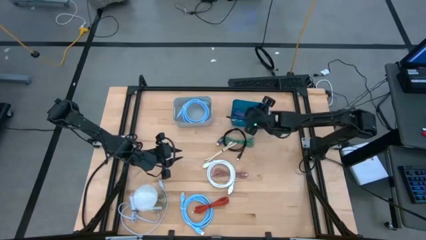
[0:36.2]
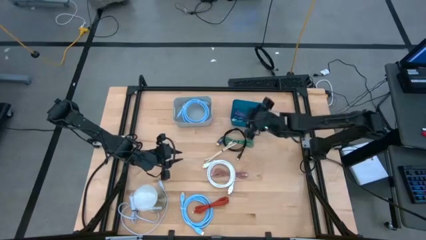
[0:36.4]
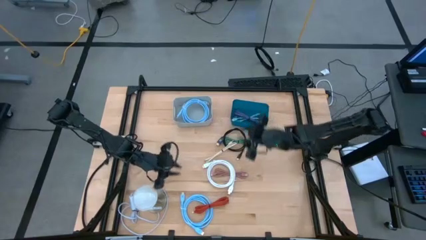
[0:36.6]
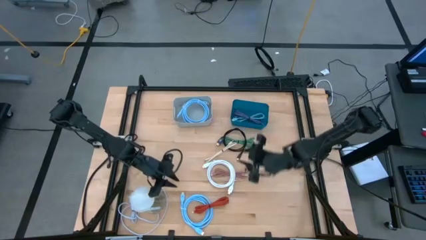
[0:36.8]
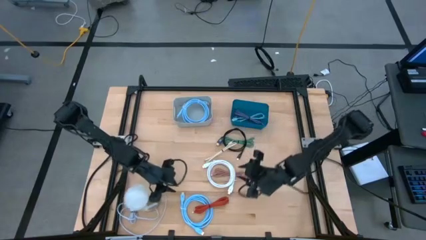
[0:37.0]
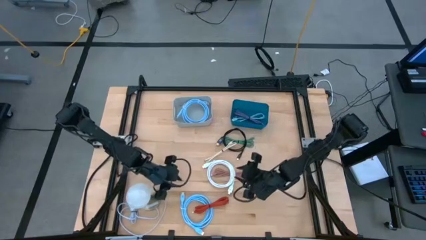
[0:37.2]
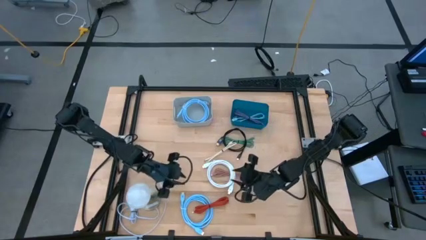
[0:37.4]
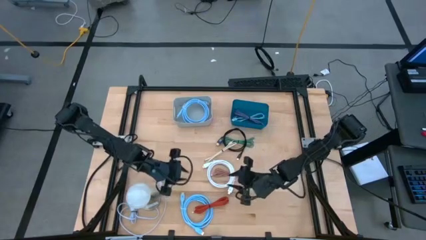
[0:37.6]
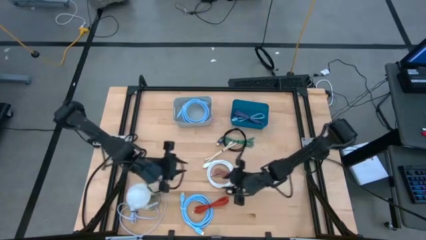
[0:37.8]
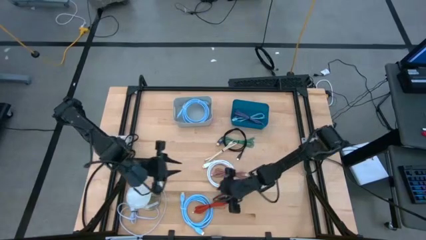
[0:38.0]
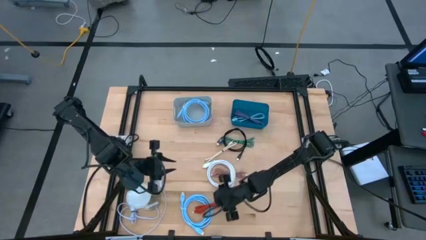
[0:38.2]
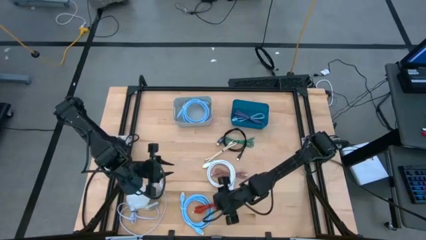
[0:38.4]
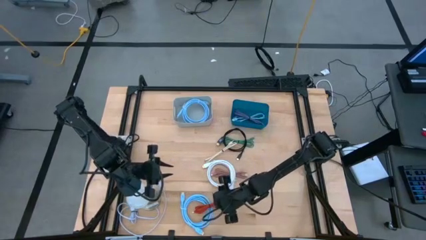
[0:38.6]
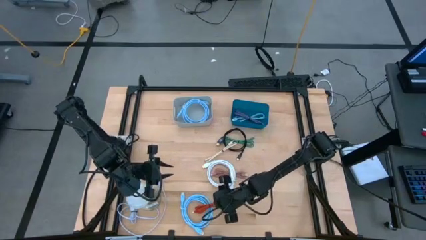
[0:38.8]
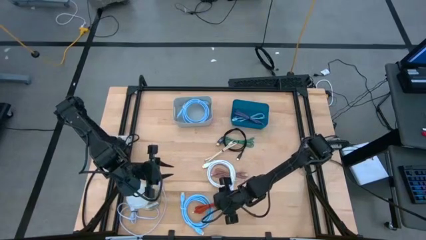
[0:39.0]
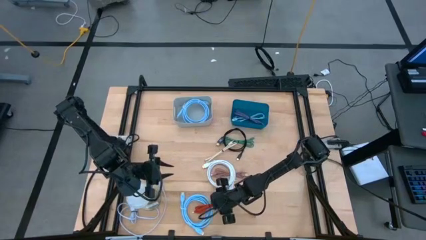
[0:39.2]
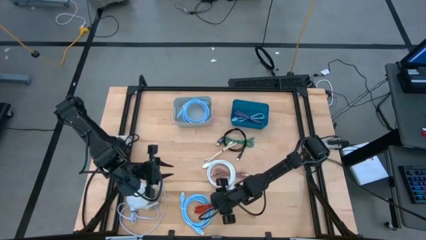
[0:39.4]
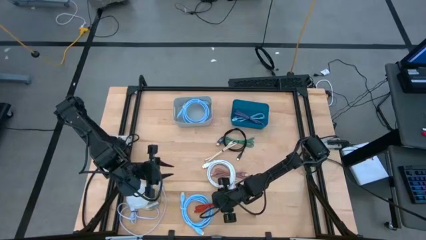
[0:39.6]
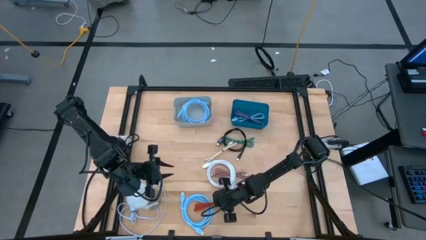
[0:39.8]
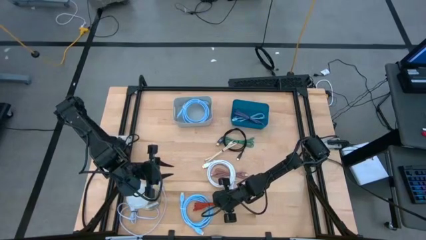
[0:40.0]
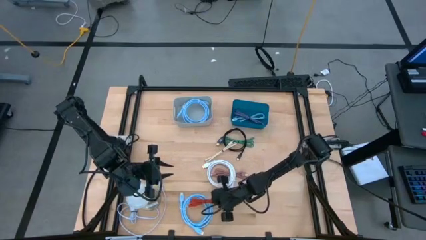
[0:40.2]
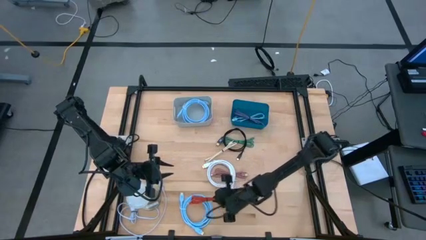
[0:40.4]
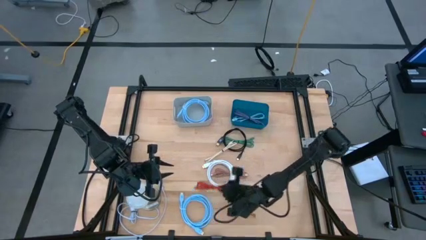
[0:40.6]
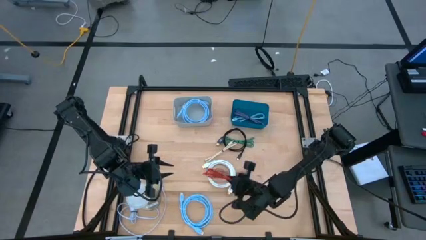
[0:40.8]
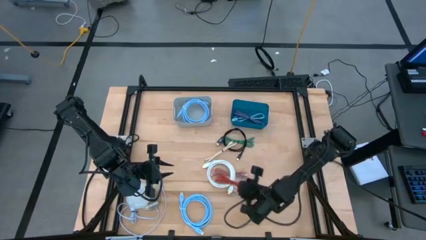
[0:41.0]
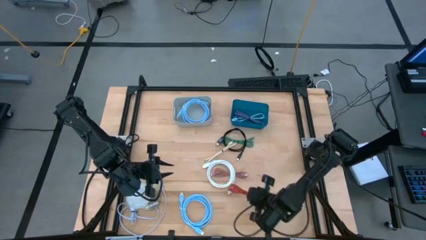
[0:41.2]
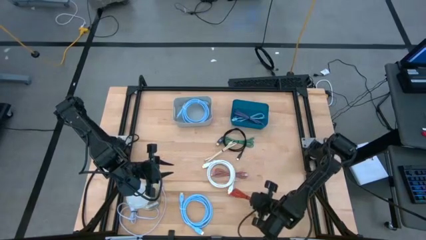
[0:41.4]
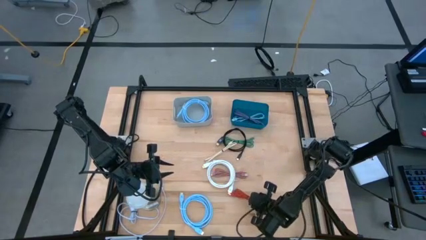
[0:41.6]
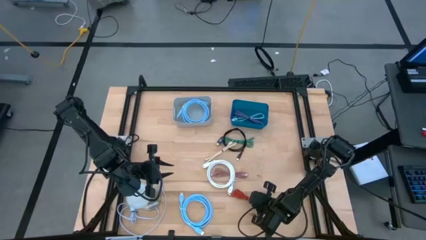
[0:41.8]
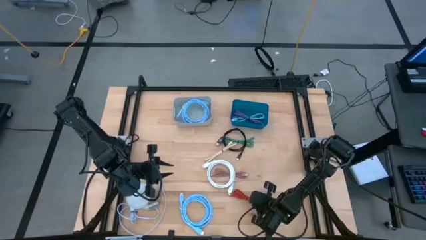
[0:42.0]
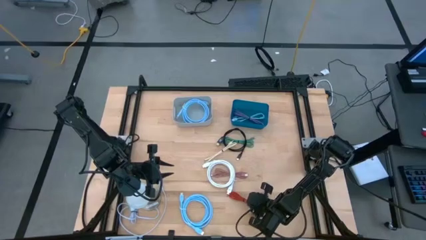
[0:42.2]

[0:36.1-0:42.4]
Task: Pick & Place USB Port
Move the red charger cable to the bottom center of the table

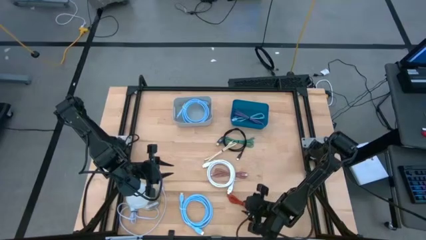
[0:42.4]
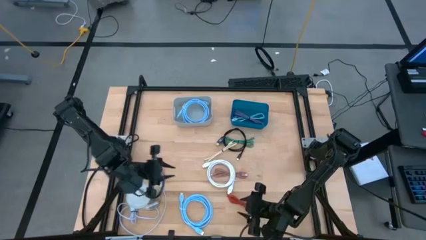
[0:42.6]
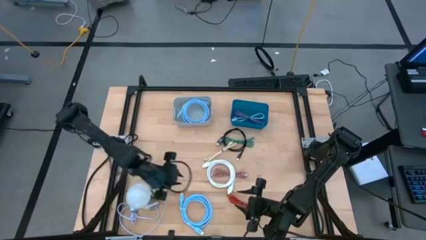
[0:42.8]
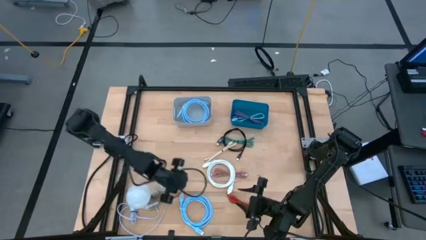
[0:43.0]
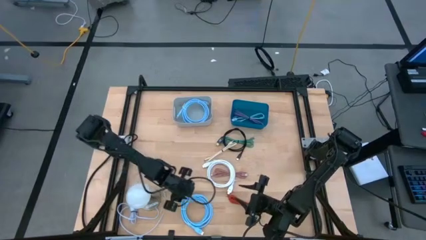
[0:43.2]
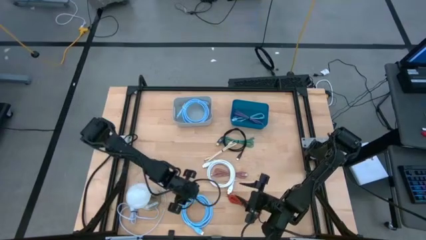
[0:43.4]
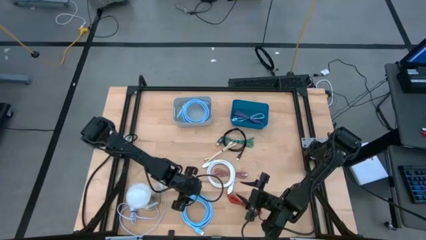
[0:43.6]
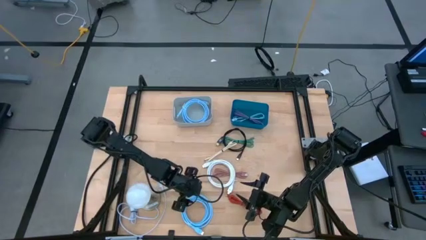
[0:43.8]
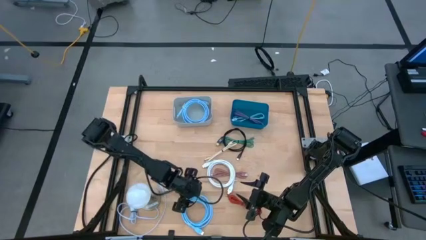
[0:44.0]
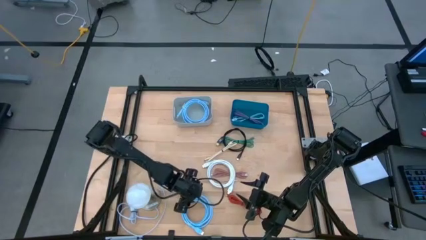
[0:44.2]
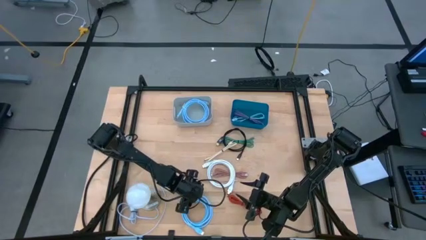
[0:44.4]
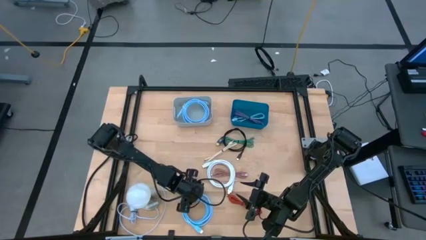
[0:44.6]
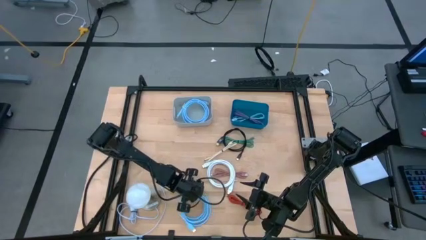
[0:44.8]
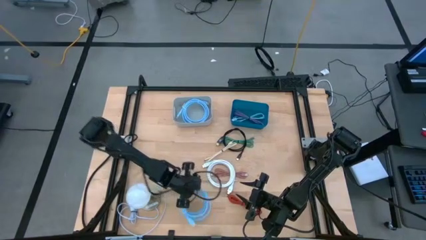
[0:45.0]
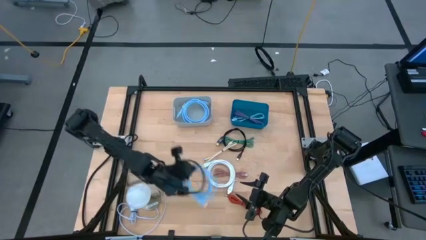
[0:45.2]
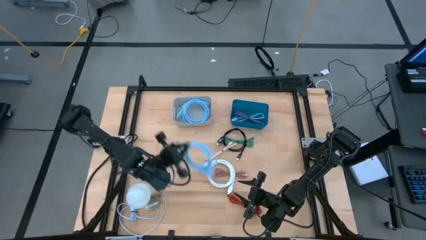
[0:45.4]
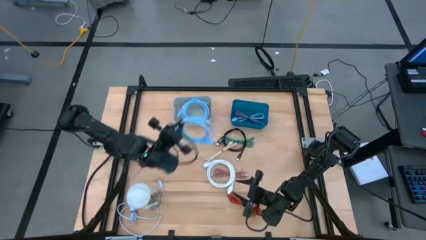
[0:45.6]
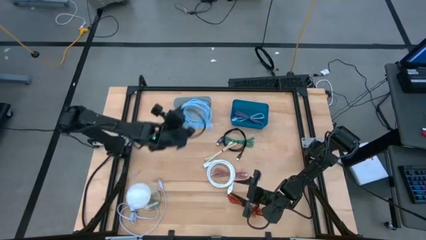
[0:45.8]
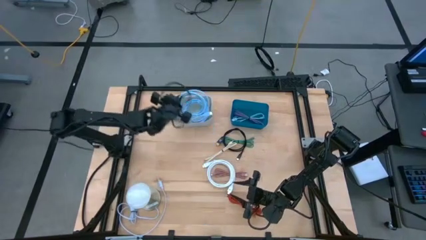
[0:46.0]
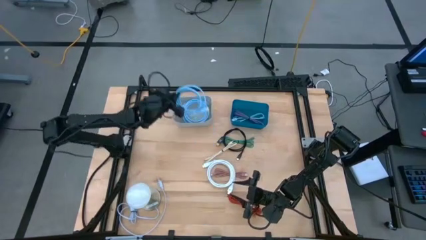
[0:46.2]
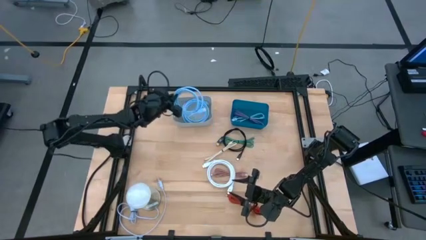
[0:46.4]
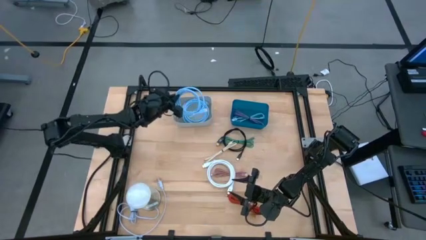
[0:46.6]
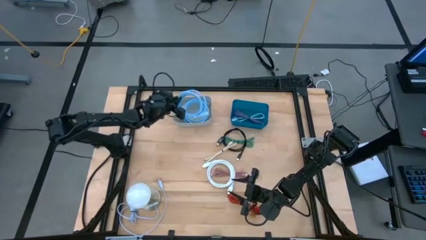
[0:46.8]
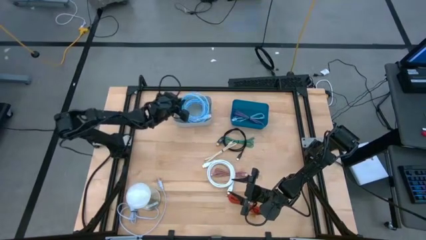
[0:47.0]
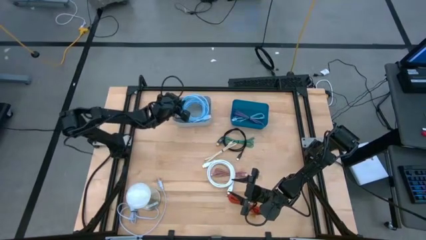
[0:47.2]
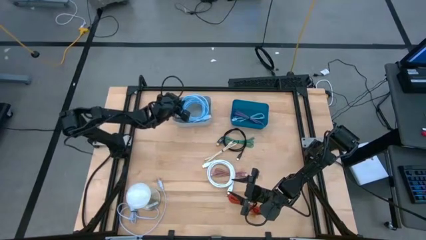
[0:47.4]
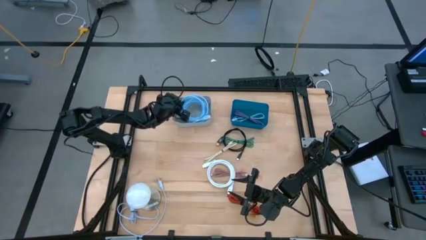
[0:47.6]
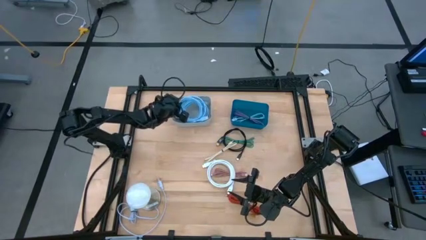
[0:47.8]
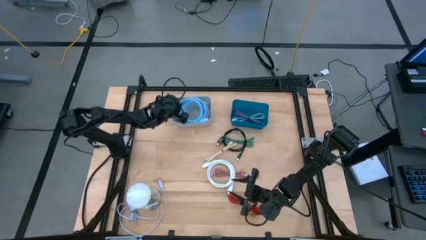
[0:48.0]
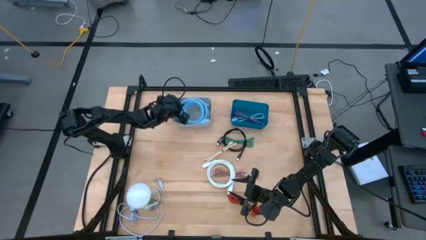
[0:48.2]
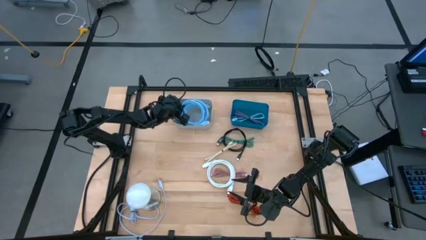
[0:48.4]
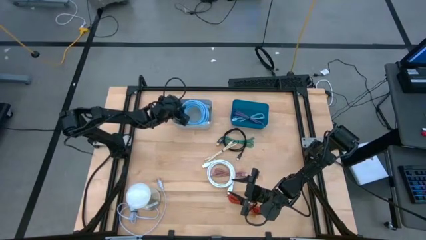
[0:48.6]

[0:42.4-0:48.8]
Put the blue hdmi cable into the gray bin

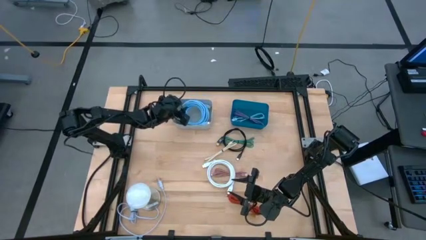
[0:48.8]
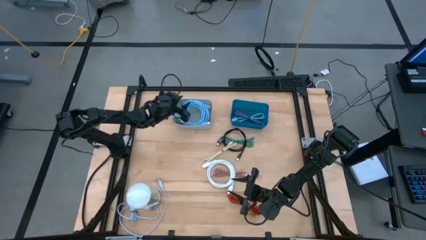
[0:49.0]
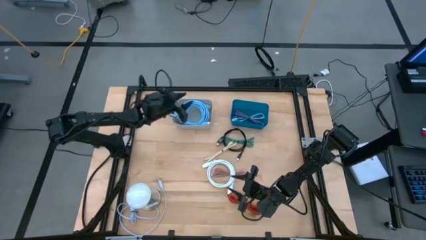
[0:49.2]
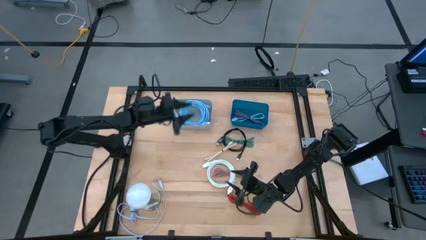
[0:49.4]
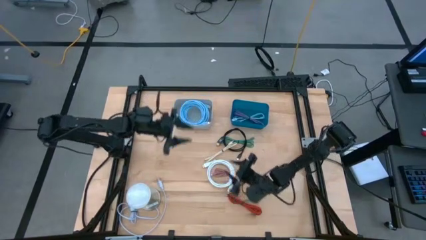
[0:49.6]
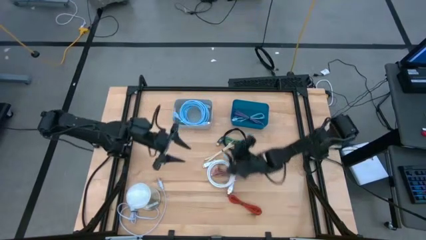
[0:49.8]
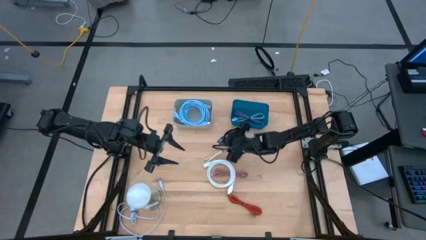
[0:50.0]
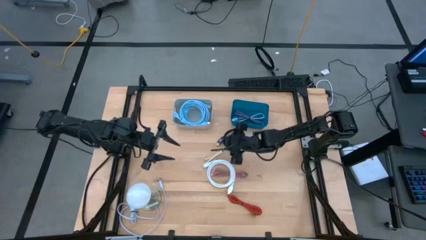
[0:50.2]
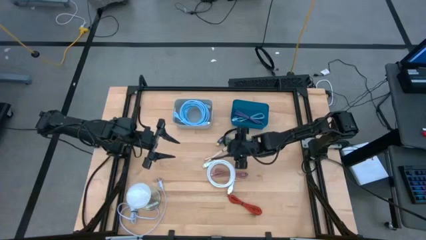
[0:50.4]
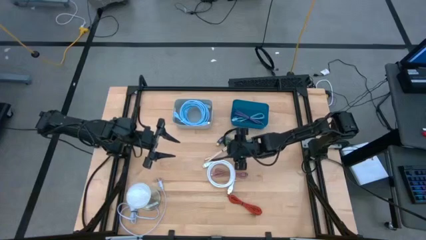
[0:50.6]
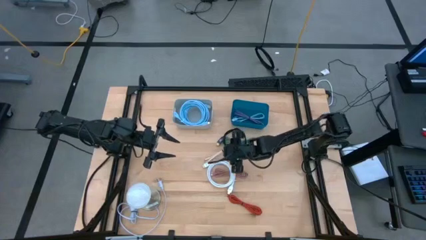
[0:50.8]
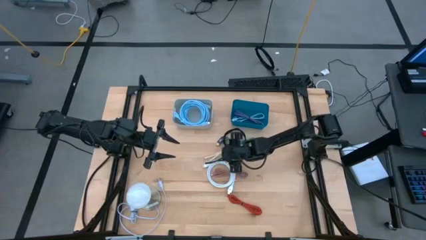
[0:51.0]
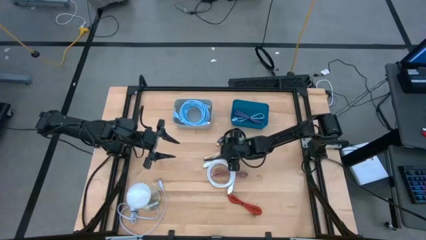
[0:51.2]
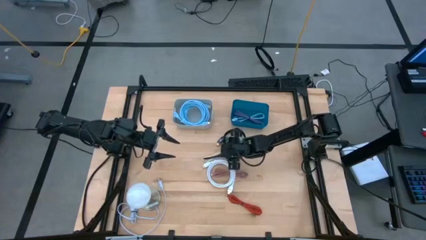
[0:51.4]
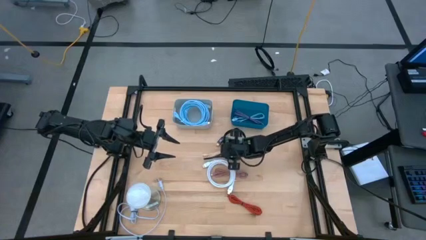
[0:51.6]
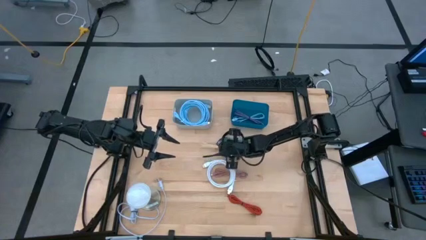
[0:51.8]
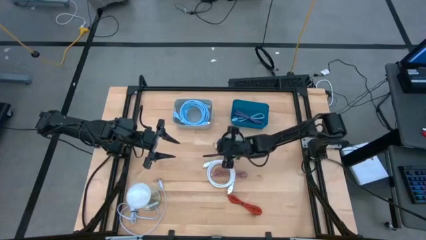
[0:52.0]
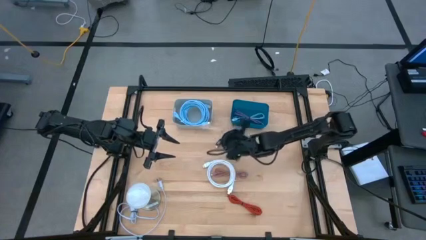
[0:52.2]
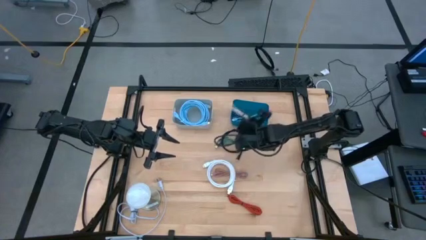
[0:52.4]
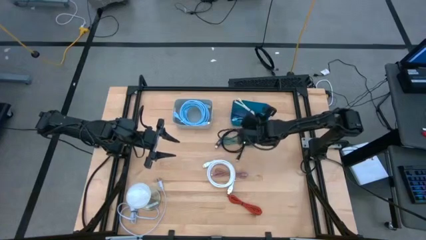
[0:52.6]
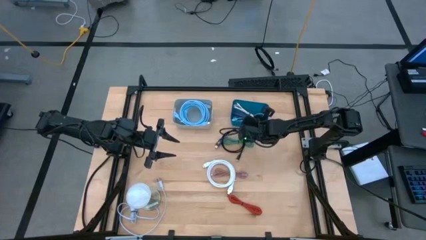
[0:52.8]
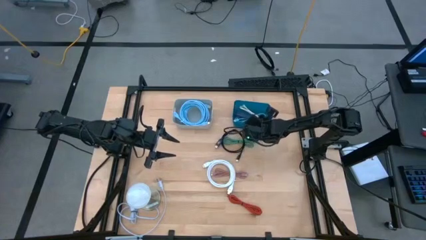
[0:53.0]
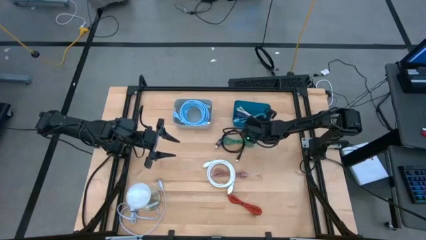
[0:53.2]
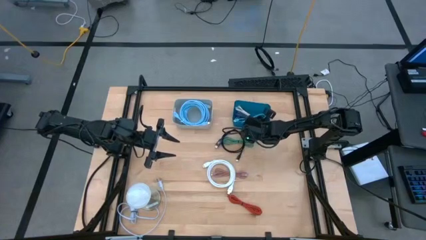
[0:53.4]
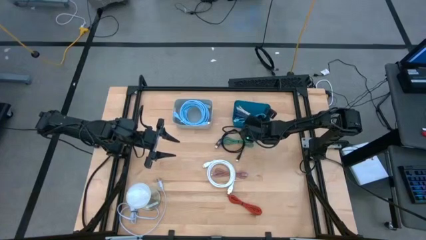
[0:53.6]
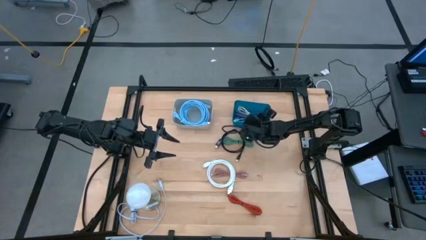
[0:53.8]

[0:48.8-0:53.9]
Put the white charger cable into the blue bin
